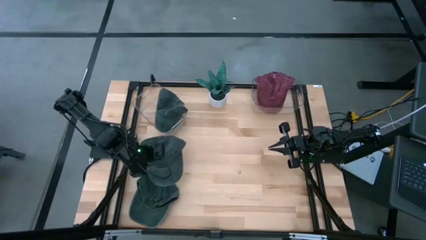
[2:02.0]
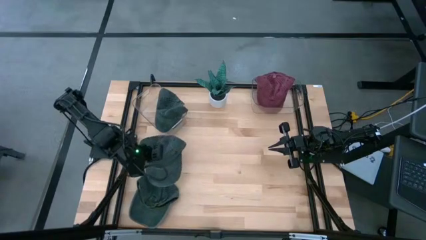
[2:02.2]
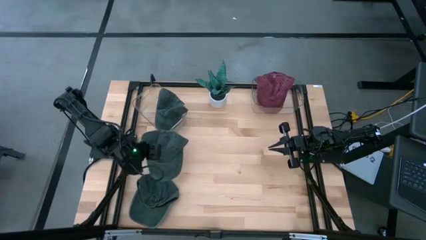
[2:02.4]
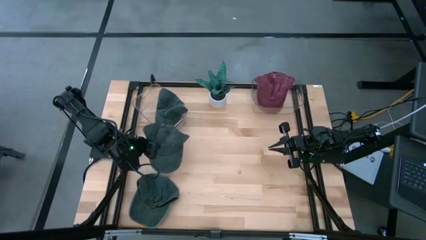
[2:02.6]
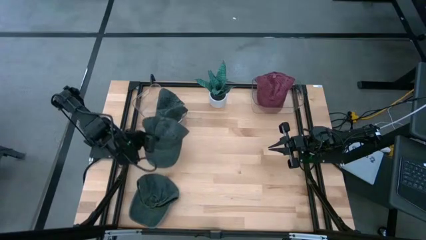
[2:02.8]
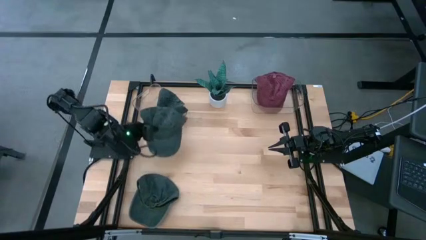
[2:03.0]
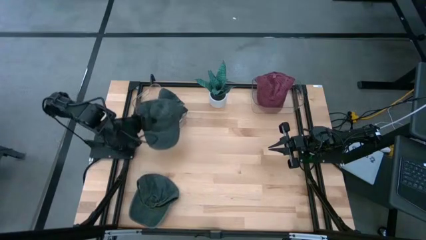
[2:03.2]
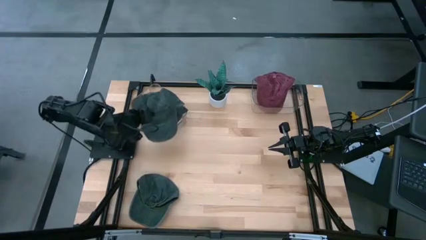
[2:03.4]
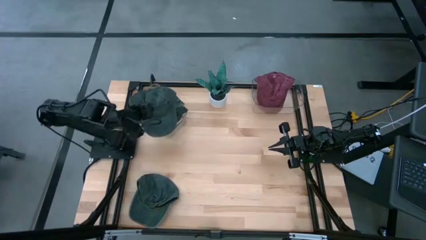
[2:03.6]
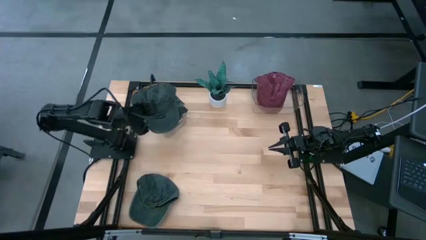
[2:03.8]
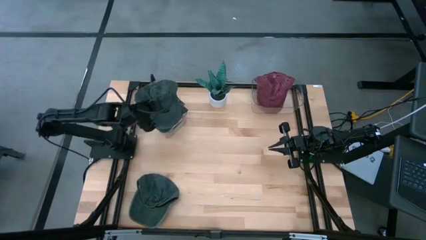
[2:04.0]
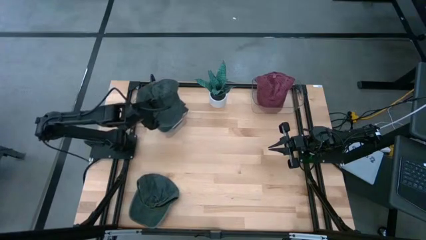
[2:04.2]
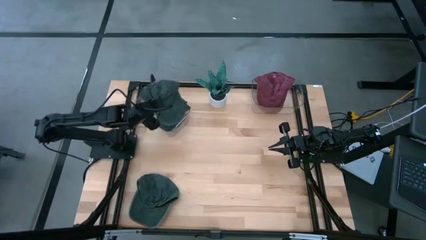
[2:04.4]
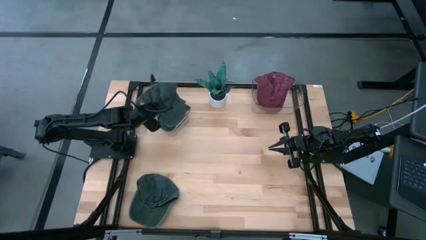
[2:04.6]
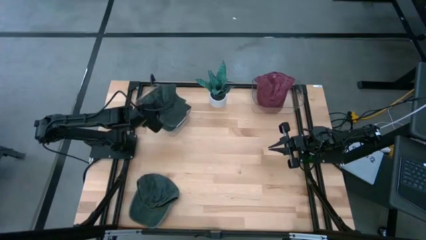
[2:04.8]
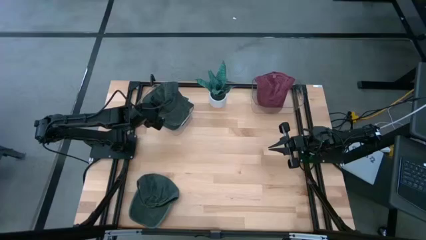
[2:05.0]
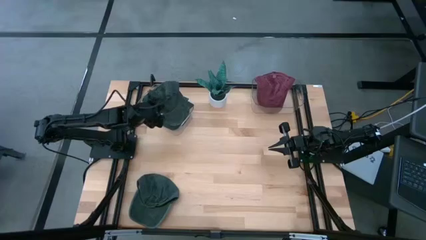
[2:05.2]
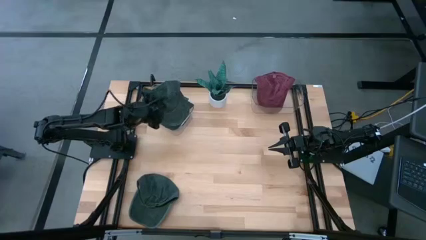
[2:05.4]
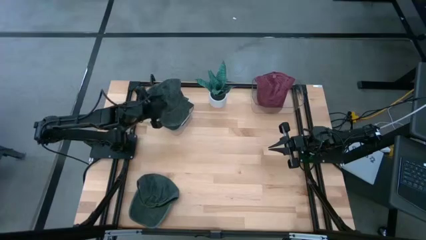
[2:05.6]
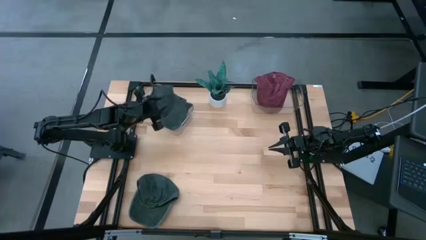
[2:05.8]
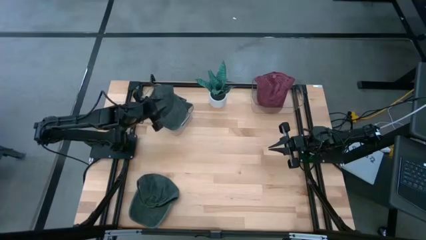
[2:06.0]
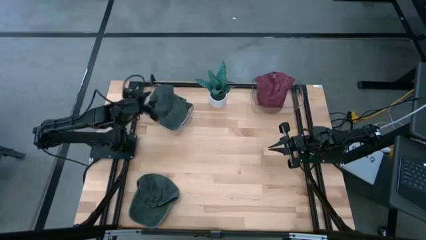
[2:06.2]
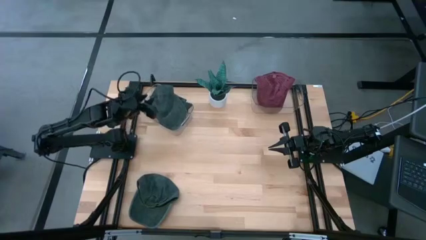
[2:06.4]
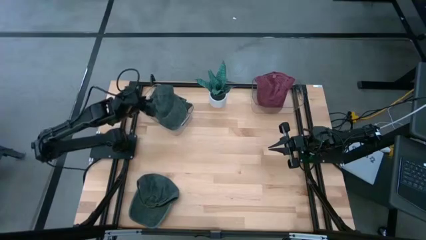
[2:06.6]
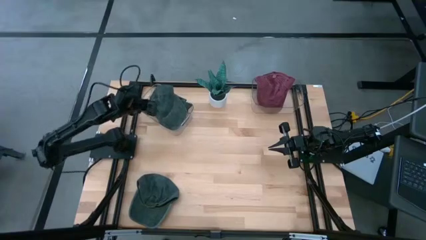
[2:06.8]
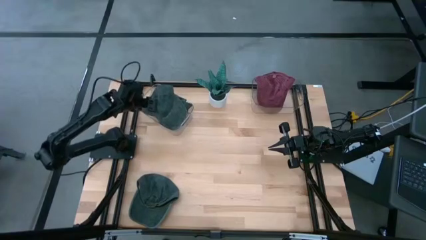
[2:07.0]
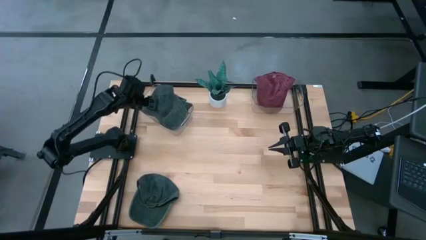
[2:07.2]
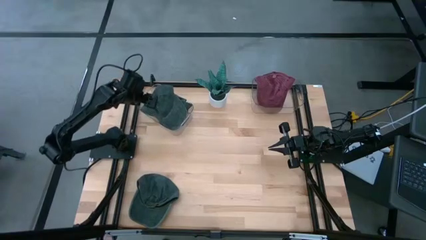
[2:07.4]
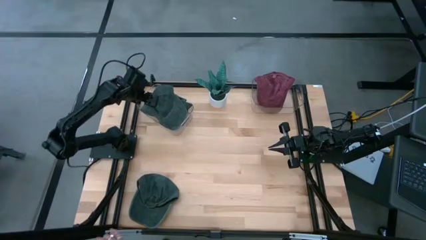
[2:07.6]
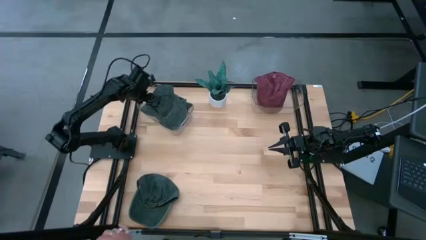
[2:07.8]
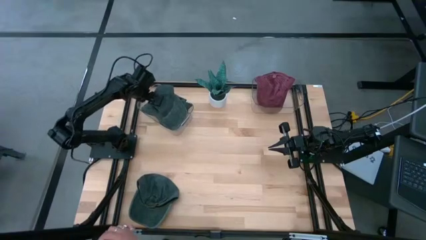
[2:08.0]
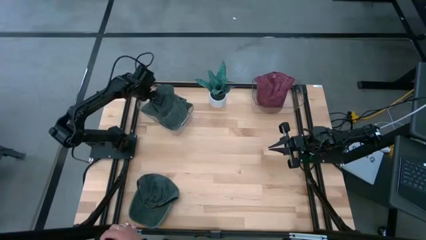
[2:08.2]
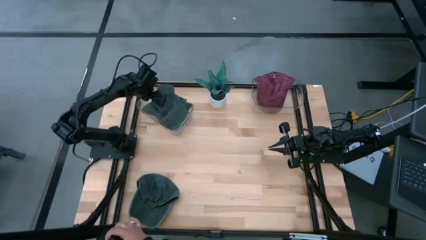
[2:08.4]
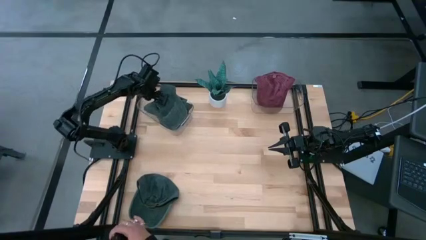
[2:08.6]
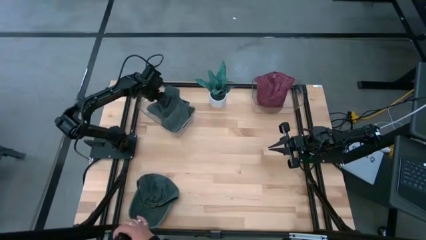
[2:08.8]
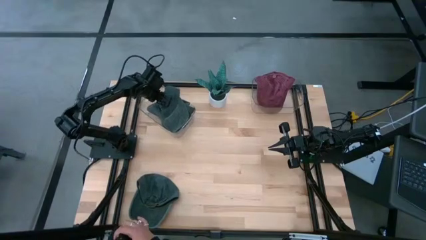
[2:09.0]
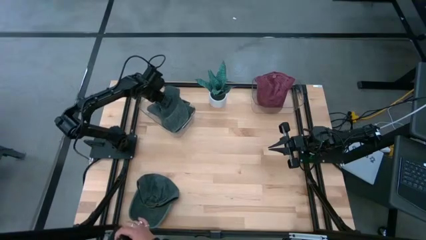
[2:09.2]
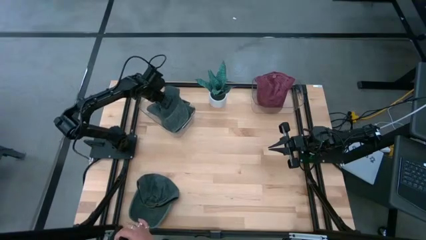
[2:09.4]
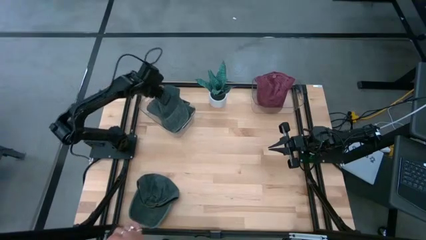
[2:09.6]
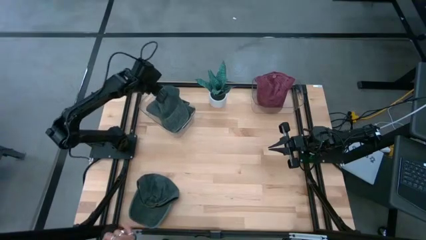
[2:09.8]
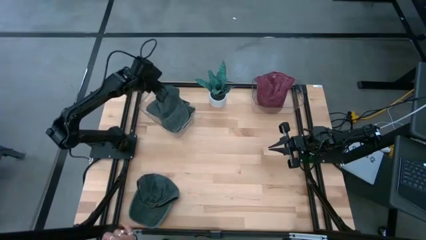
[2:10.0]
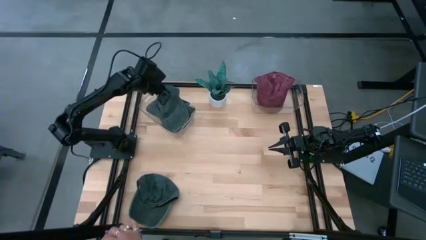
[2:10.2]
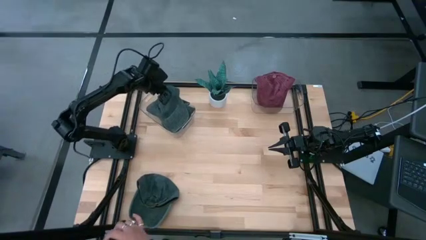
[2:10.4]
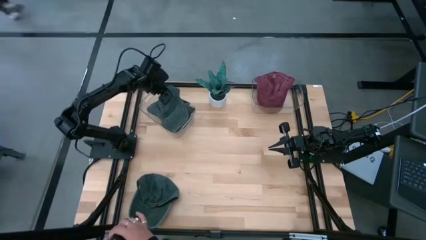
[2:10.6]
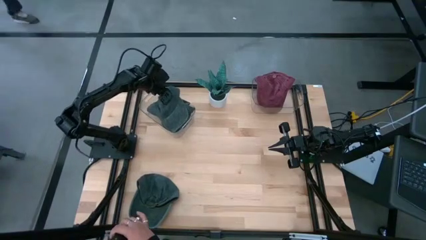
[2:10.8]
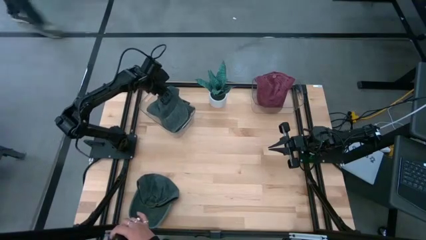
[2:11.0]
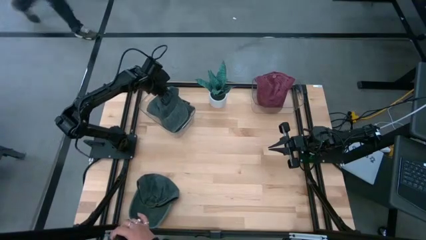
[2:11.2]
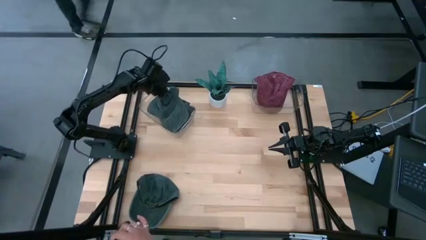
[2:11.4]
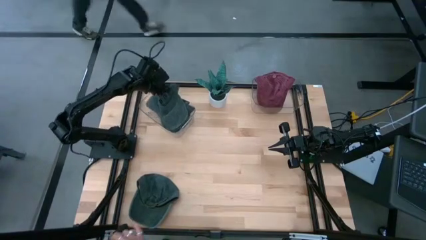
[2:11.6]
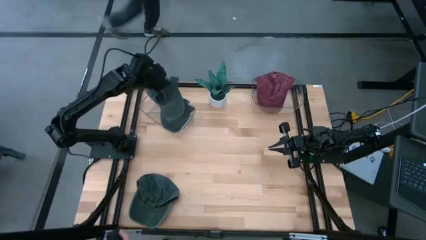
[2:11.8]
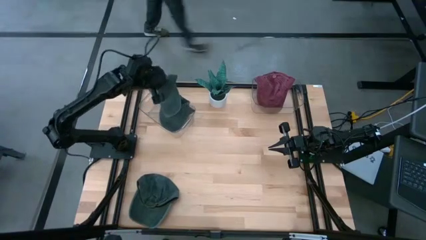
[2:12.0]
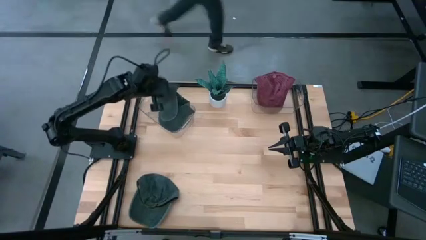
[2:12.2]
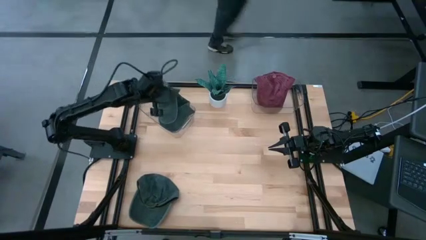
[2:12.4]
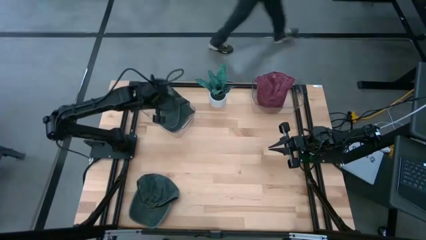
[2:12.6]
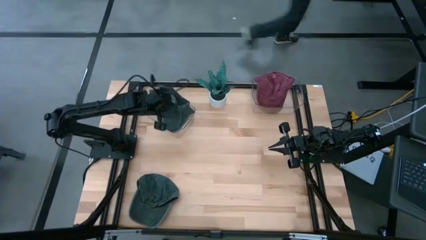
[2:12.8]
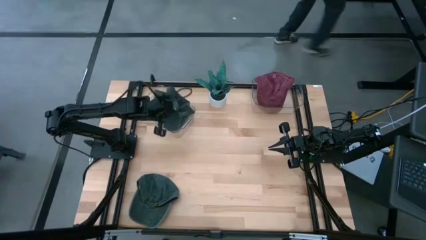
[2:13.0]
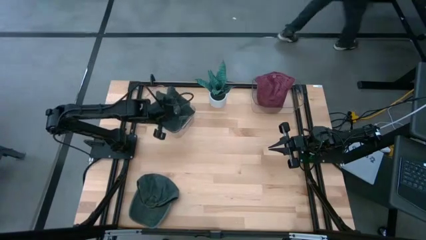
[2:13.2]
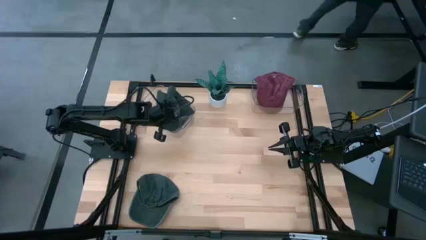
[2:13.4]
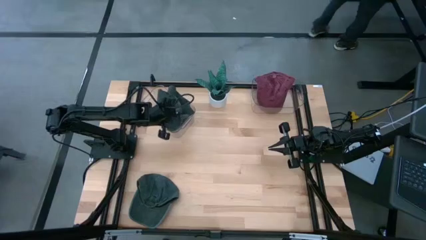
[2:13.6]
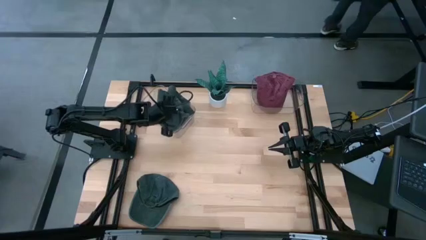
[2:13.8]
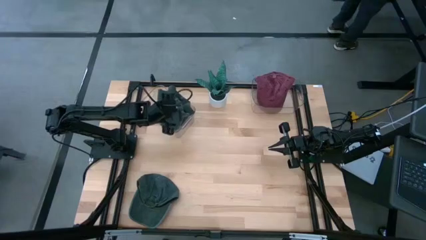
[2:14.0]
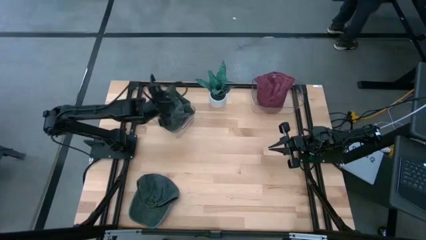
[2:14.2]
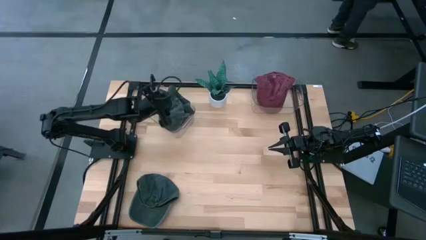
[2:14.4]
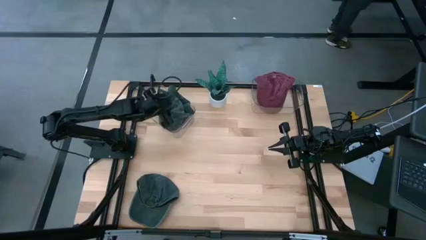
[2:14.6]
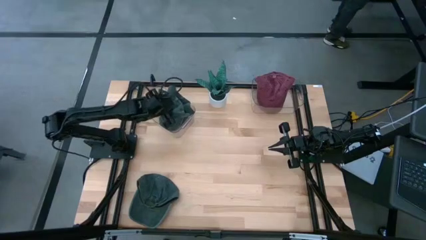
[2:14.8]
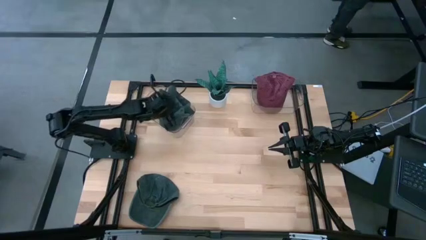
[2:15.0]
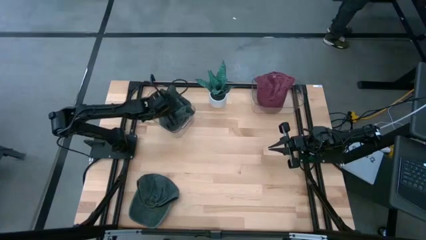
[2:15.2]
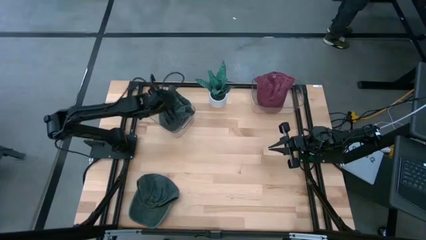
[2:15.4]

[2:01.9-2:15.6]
Task: Pick & Place hat
Put the right black cap into the left transparent bin
